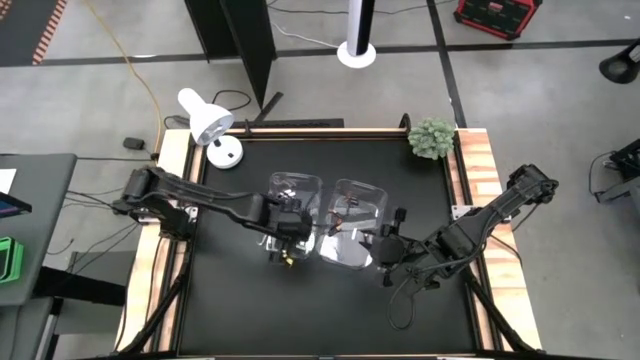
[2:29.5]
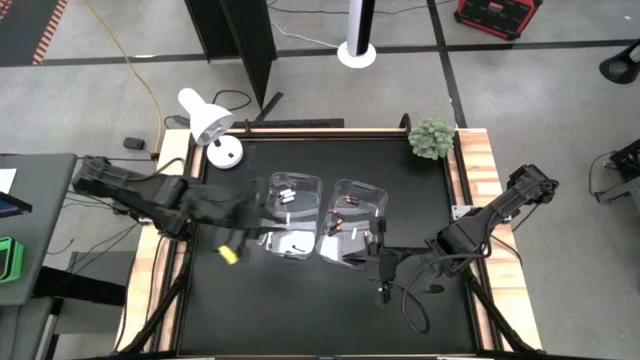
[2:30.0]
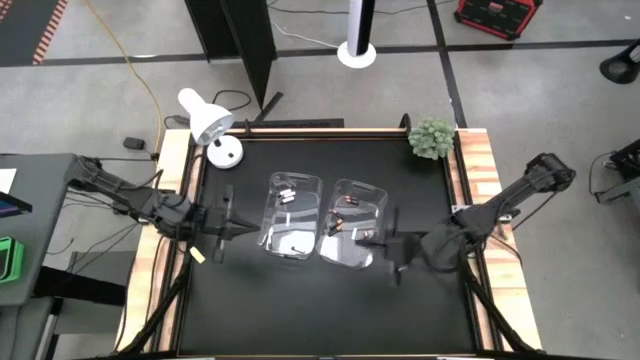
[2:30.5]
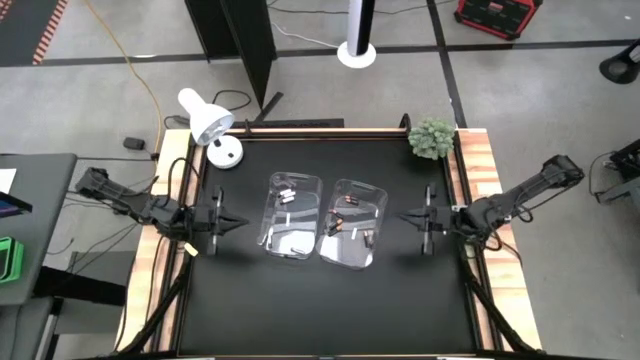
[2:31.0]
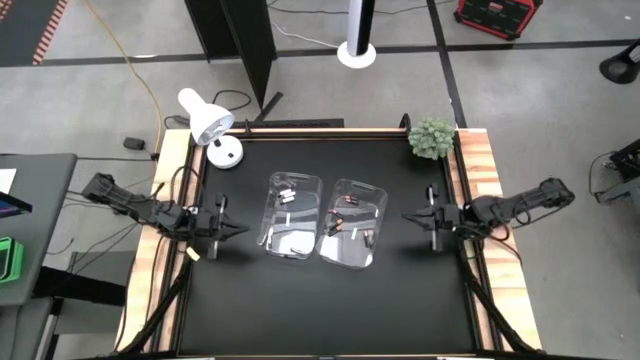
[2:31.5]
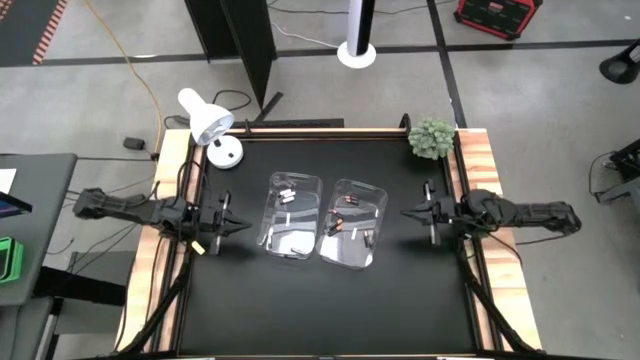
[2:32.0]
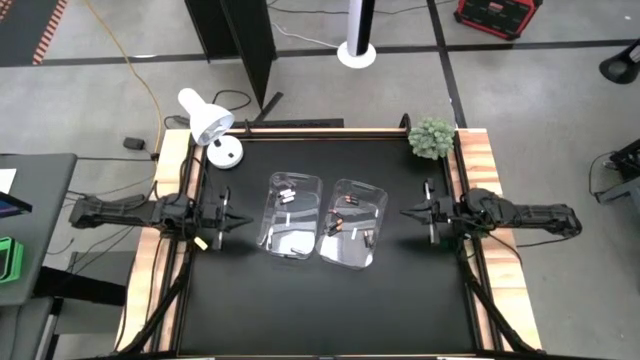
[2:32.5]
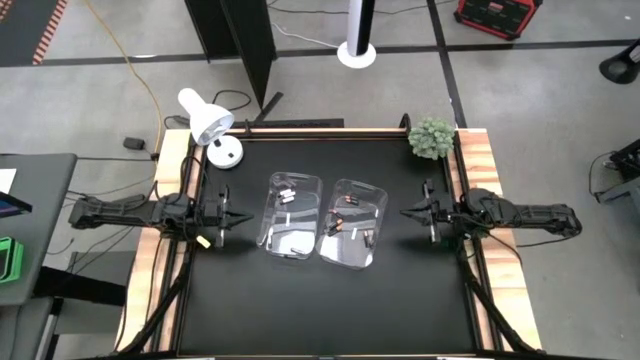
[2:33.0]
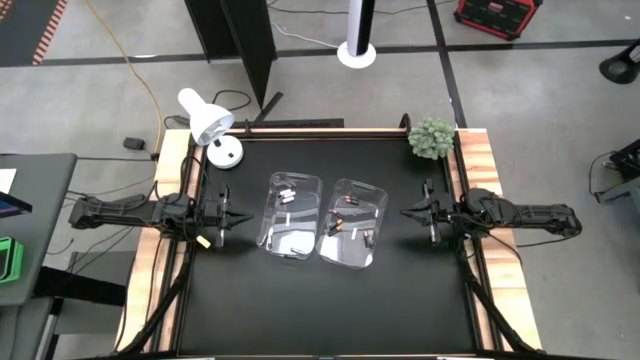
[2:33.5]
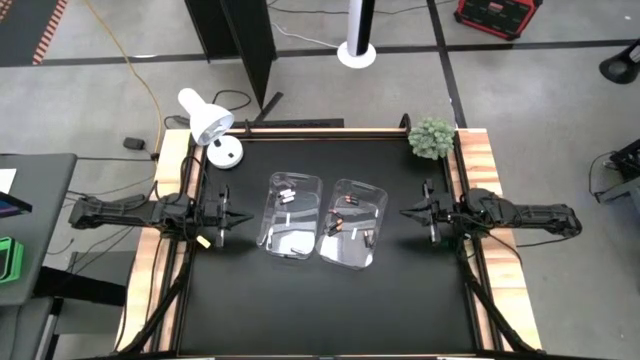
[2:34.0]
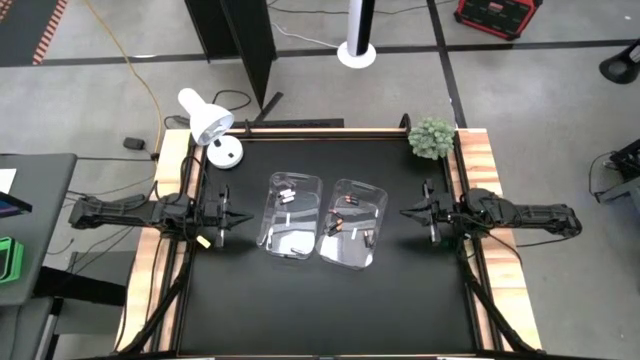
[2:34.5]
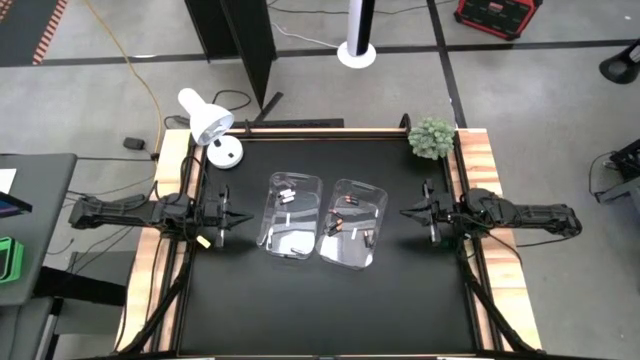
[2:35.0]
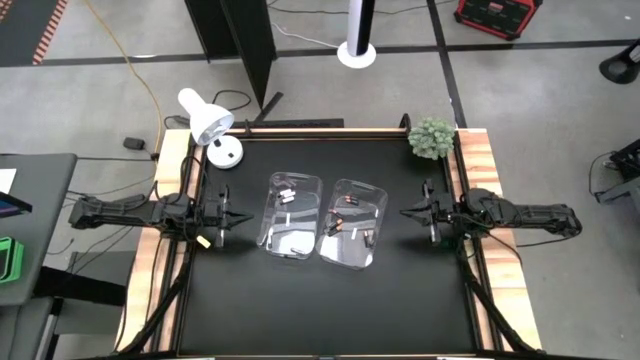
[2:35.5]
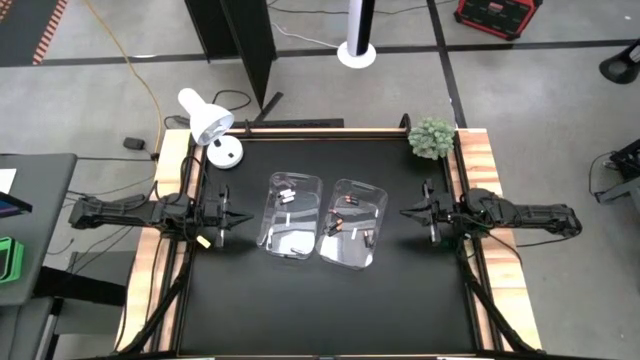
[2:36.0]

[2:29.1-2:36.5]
Task: Sort batteries
Return to Home Position

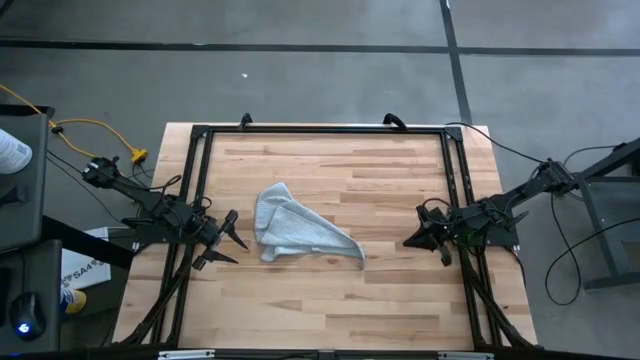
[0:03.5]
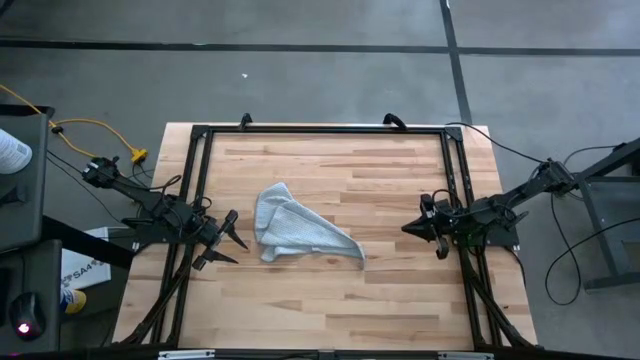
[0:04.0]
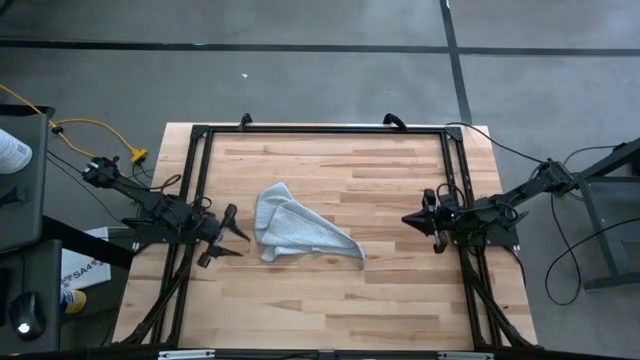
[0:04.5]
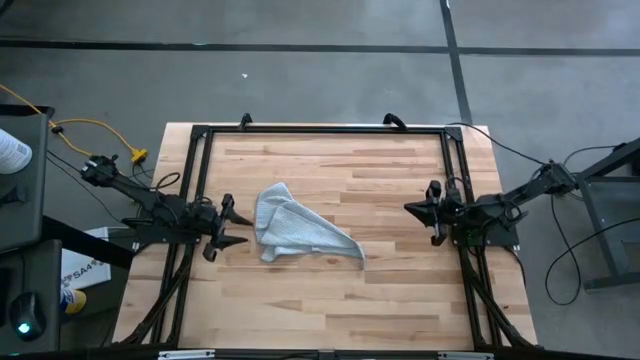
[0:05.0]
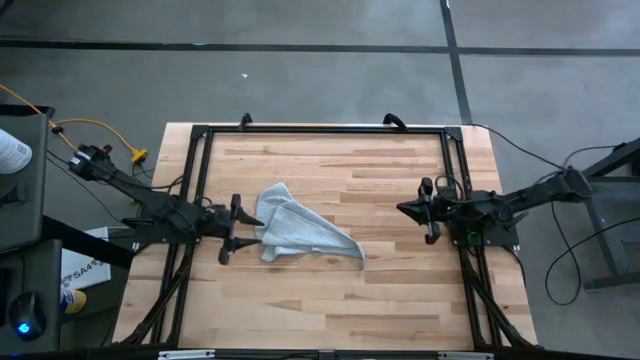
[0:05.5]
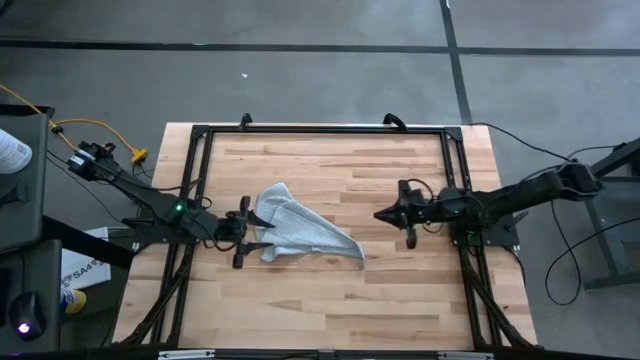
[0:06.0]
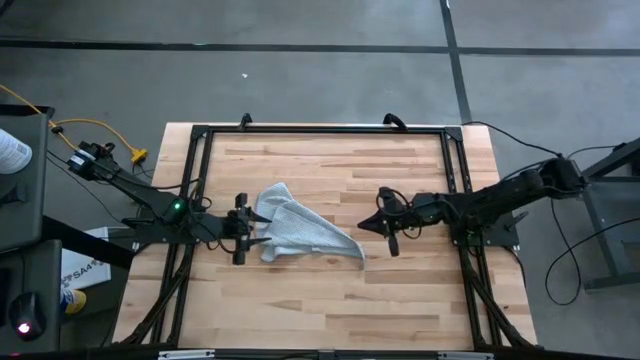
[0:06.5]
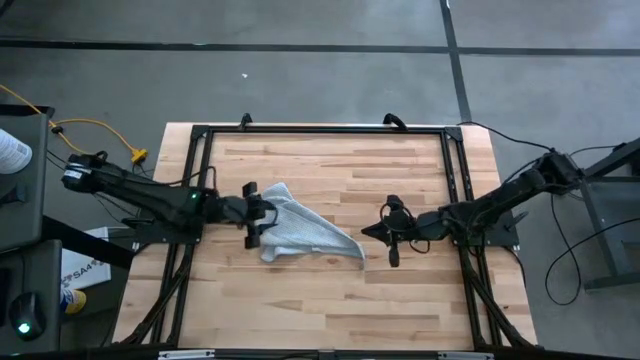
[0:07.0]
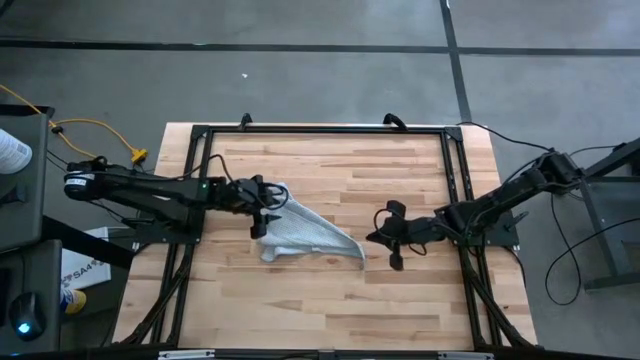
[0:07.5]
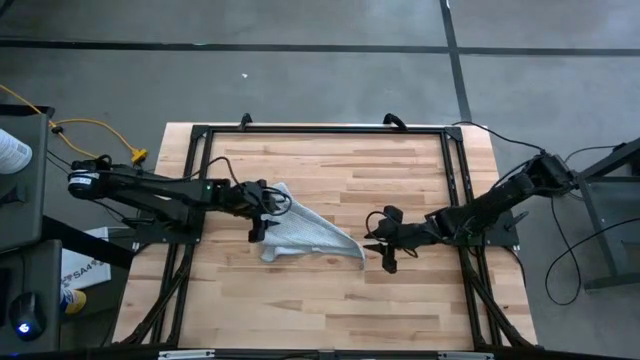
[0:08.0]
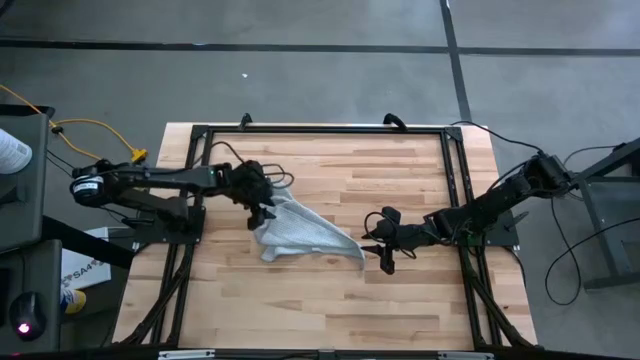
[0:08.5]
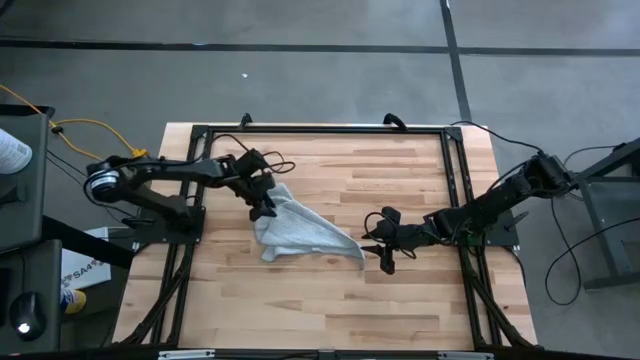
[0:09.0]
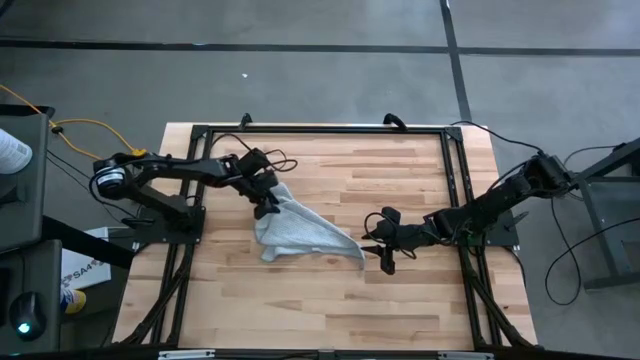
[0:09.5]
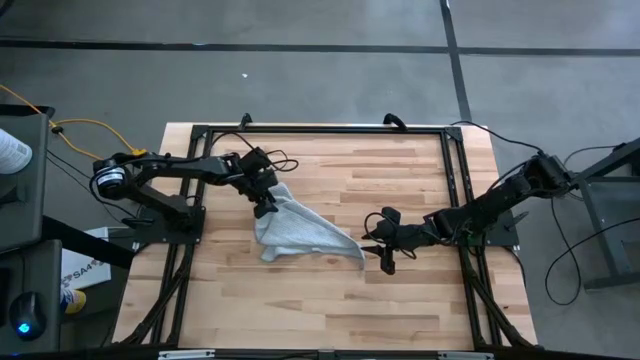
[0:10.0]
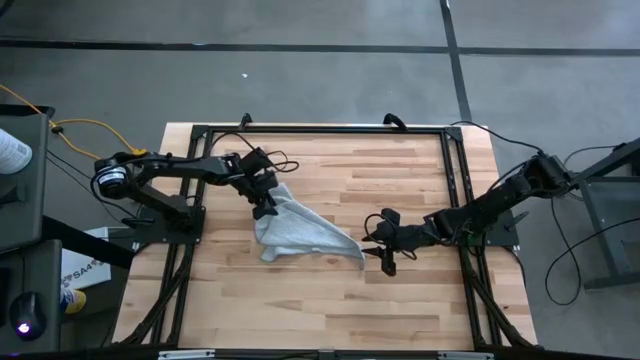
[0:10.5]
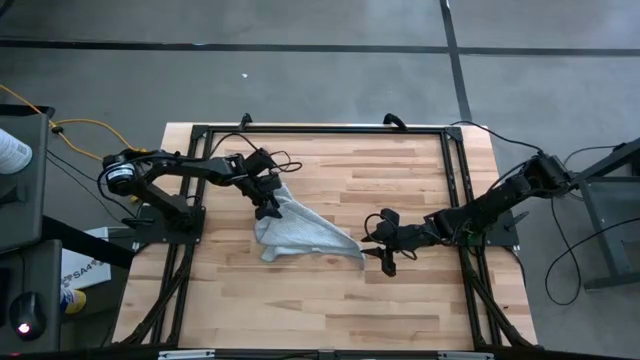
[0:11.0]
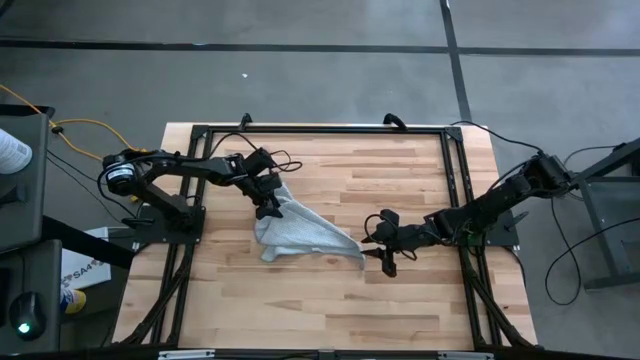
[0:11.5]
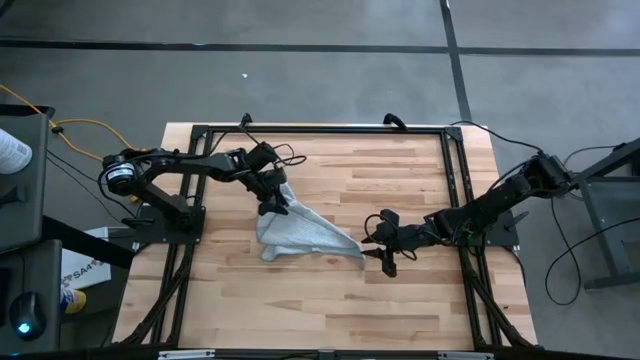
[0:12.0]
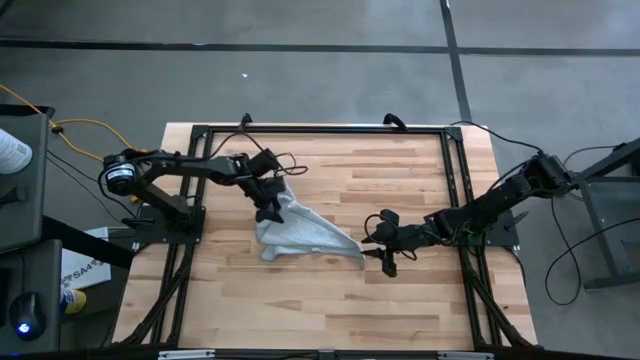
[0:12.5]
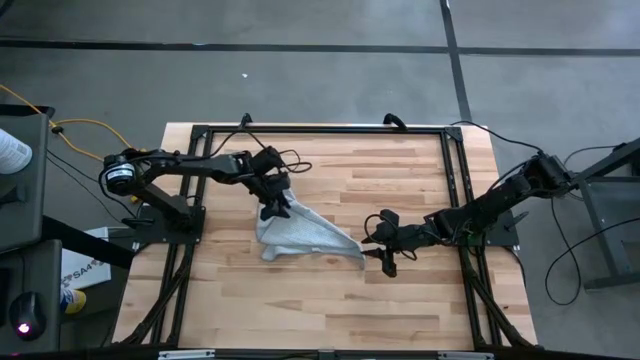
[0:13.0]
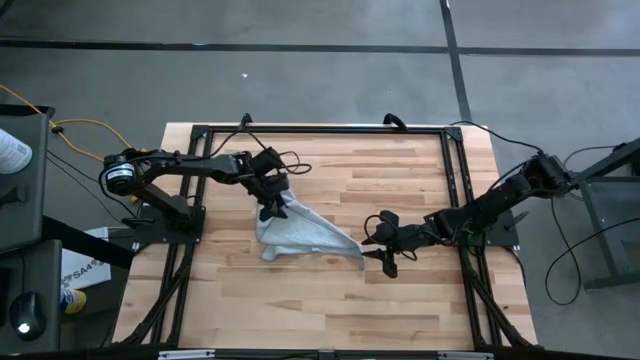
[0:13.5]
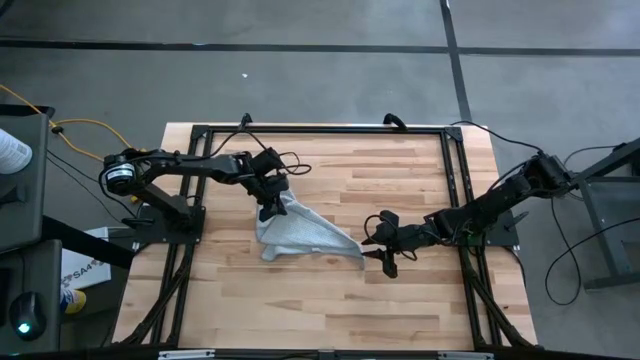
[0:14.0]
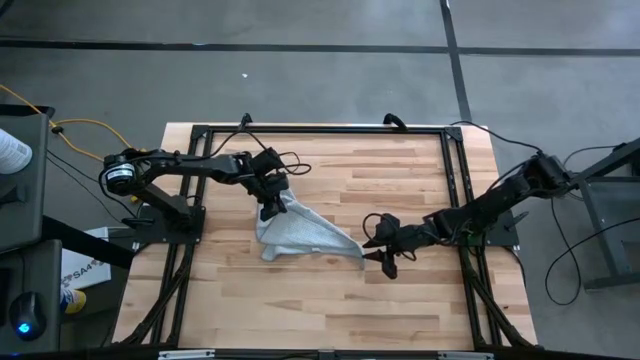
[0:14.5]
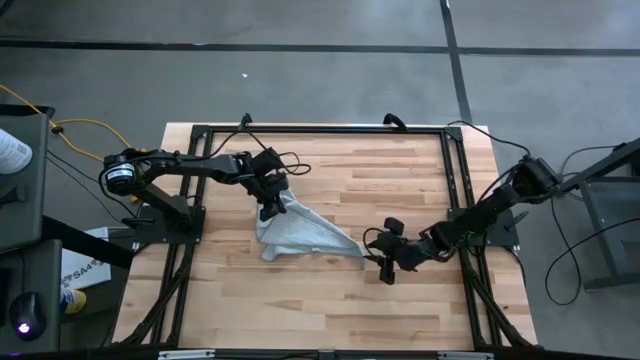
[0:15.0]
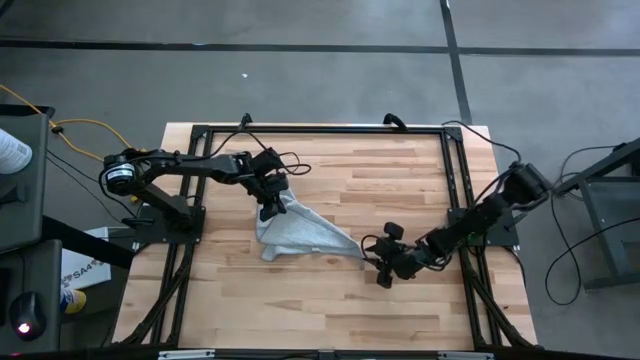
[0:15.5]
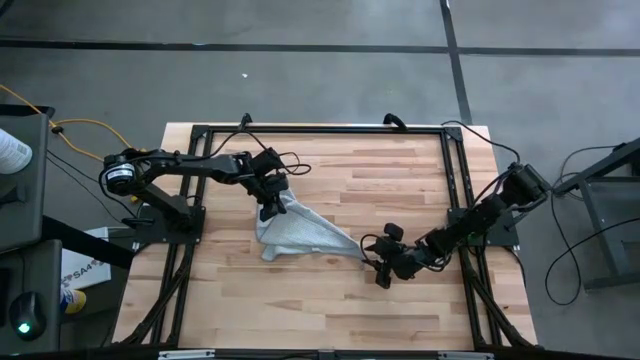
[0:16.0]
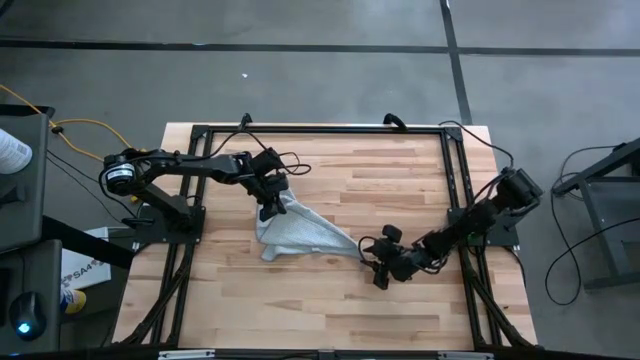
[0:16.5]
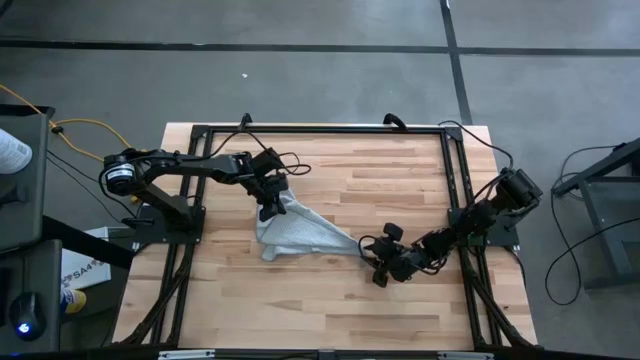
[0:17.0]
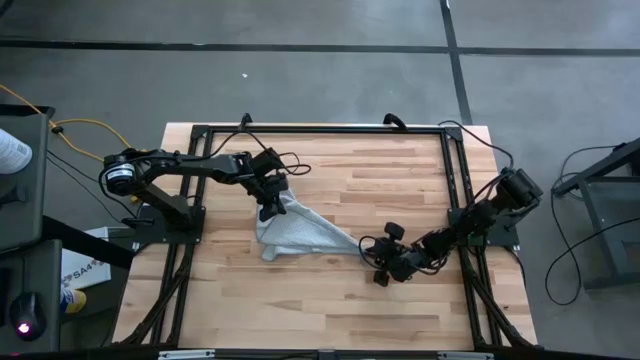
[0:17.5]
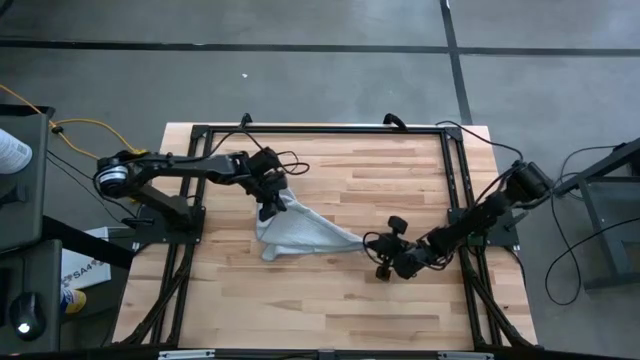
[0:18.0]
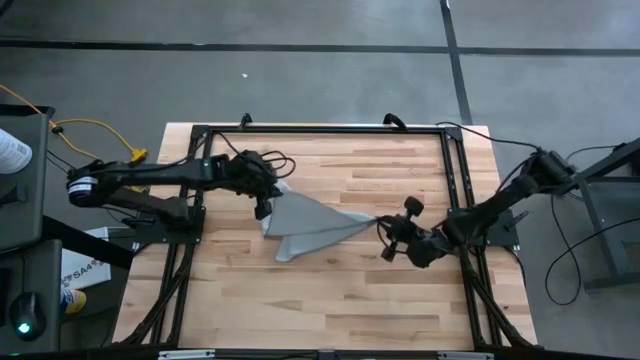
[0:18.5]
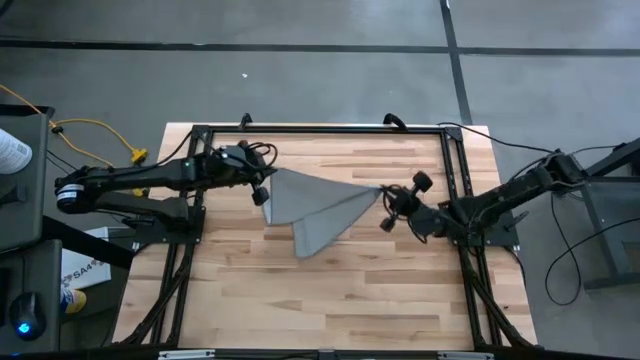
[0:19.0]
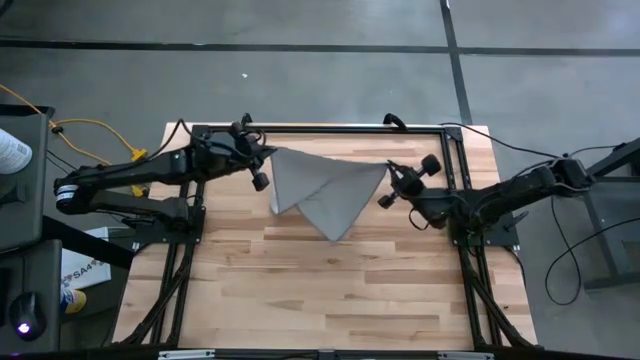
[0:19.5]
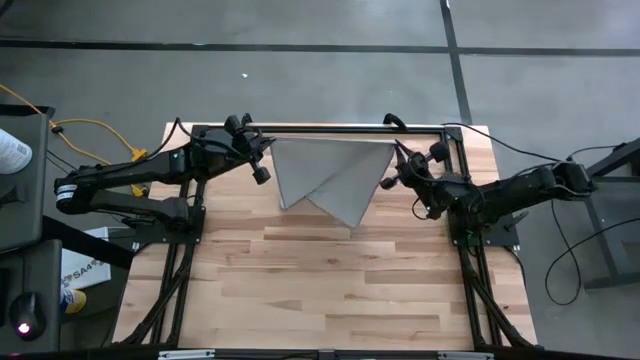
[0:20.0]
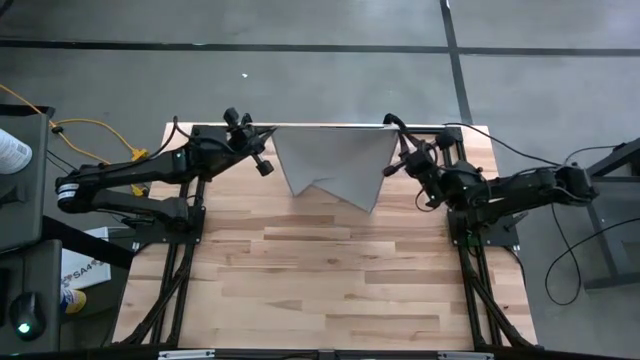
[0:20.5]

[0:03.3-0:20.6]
Task: Fold microfiber towels
Fold the gray microfiber towel
